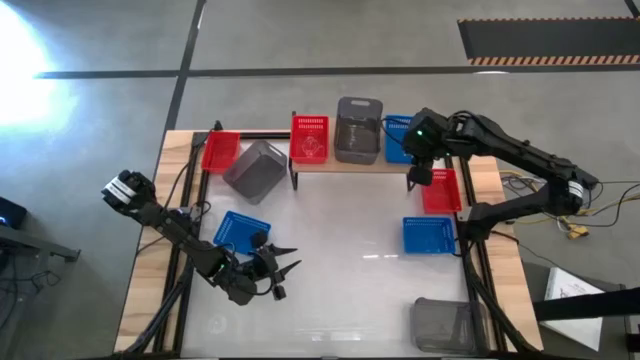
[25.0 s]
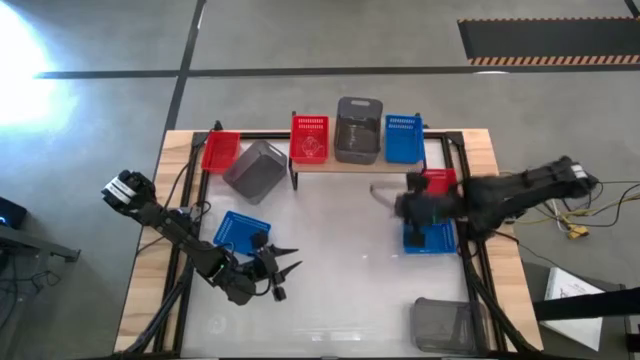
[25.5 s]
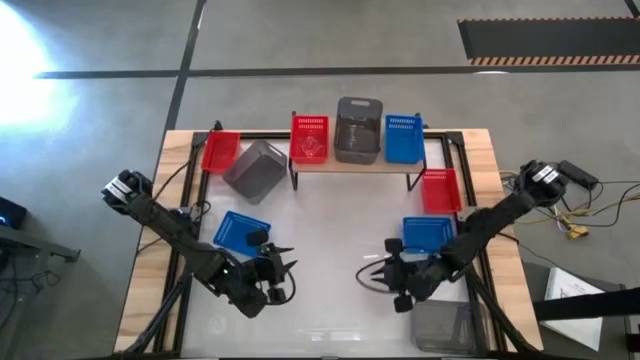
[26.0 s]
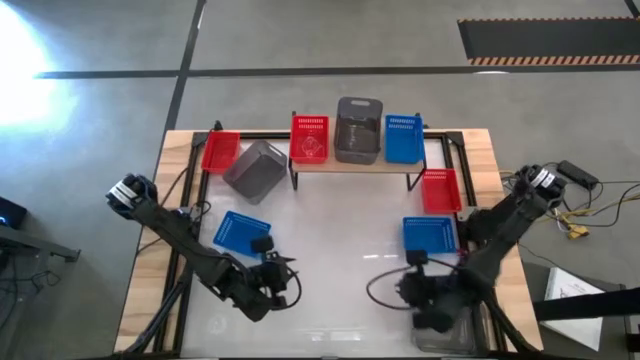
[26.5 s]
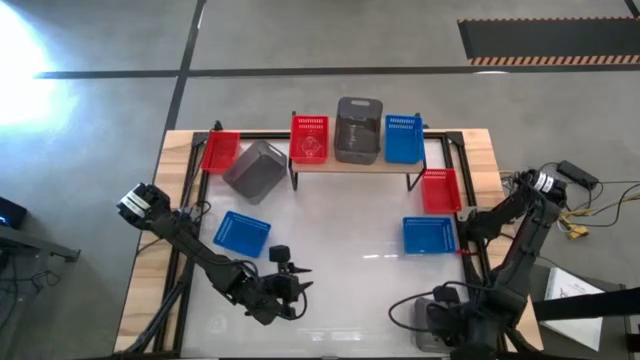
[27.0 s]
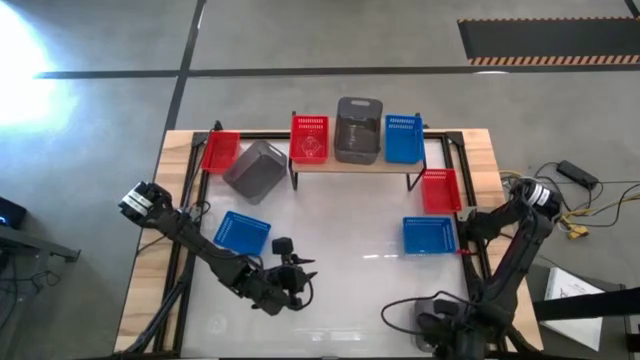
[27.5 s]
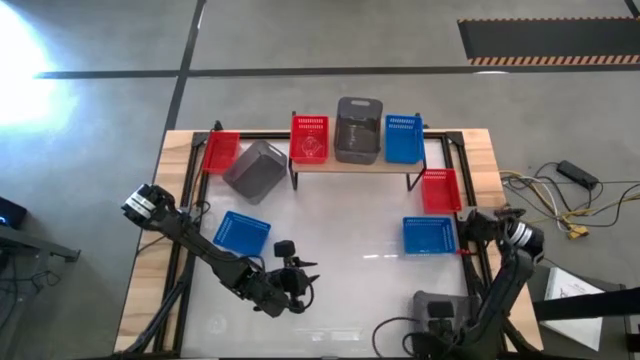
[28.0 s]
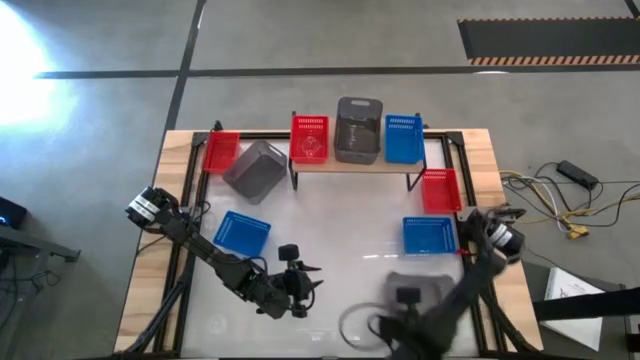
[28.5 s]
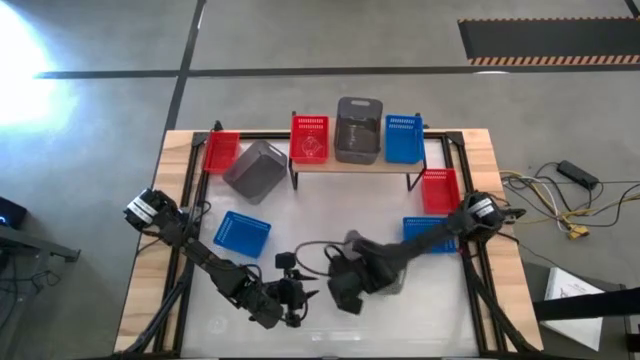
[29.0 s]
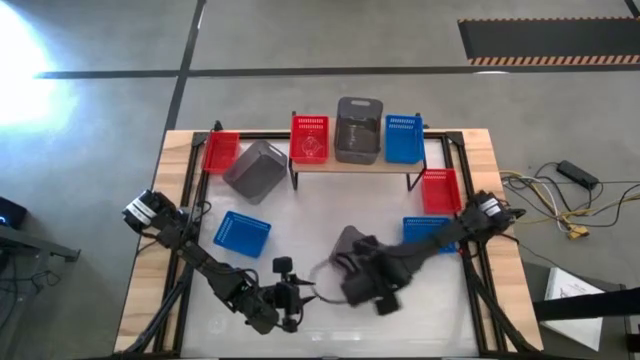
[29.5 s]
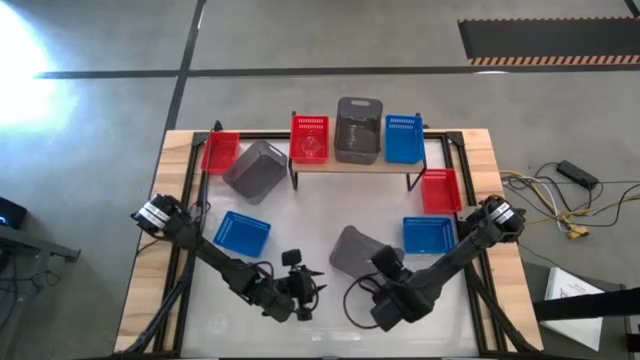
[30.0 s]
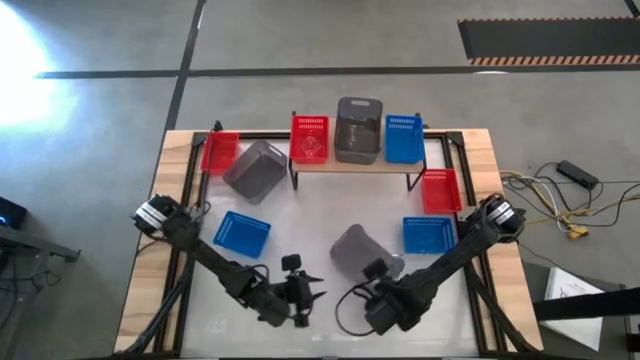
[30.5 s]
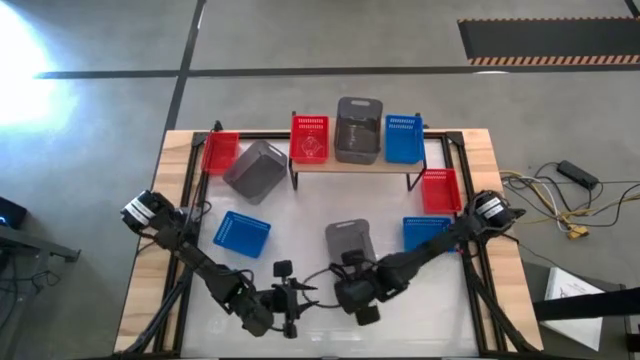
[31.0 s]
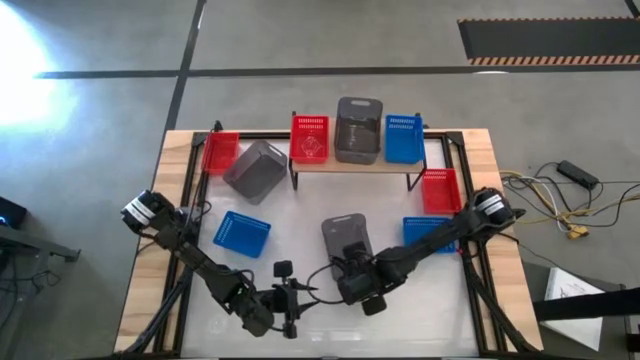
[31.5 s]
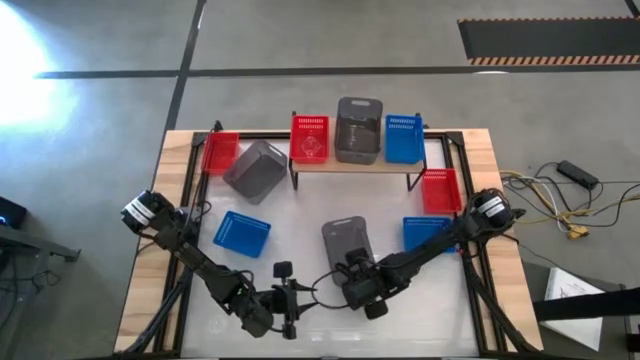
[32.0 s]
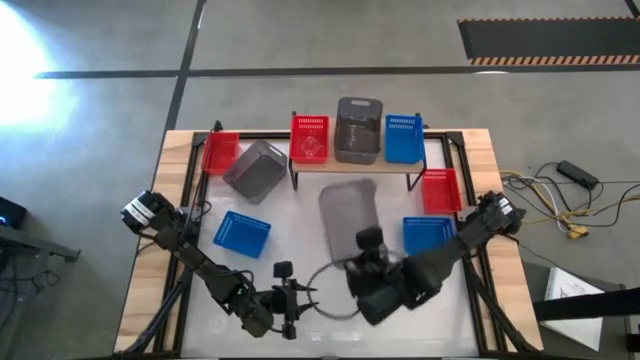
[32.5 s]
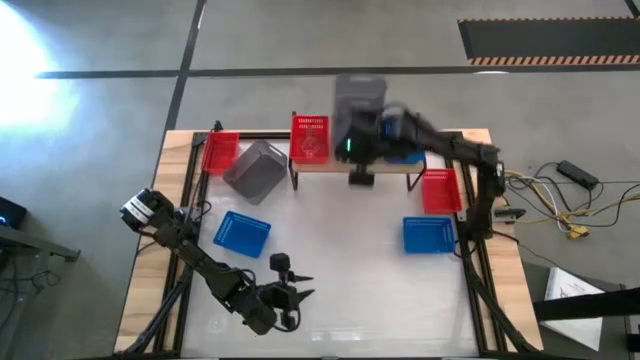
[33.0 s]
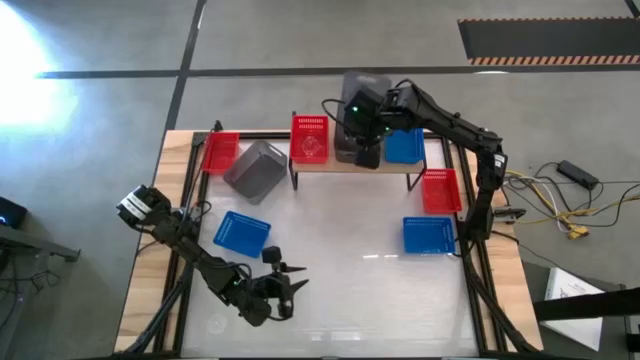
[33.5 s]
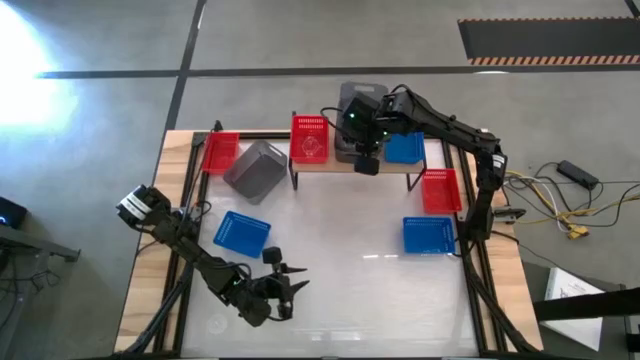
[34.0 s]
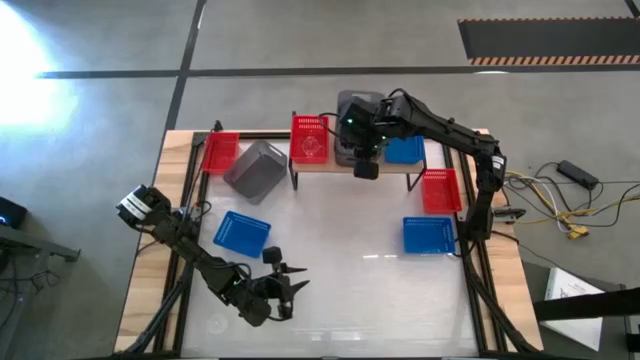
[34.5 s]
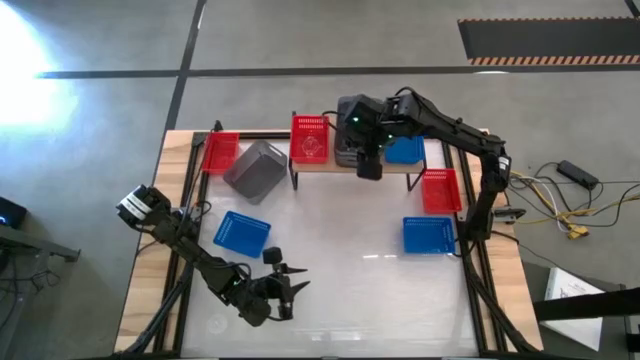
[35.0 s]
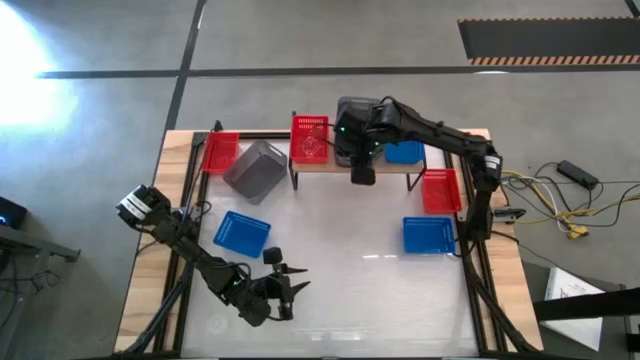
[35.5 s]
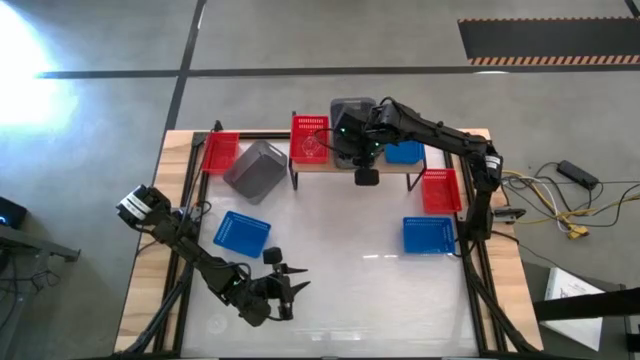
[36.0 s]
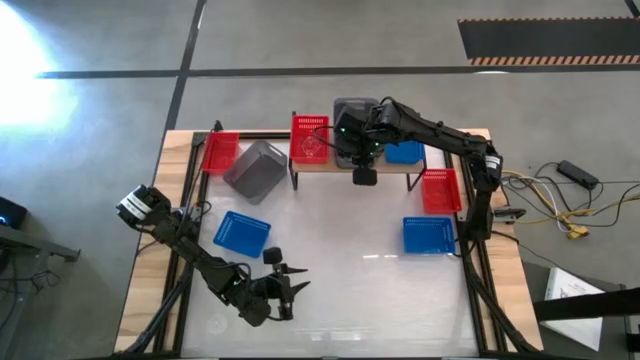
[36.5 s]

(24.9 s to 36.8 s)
Task: Stack baskets on shelf by color
Stack the right black bin into the black bin on the shelf

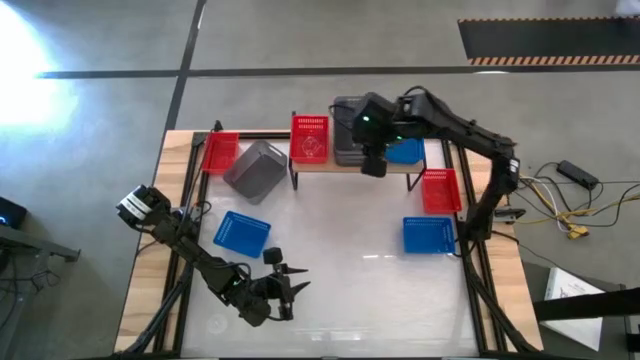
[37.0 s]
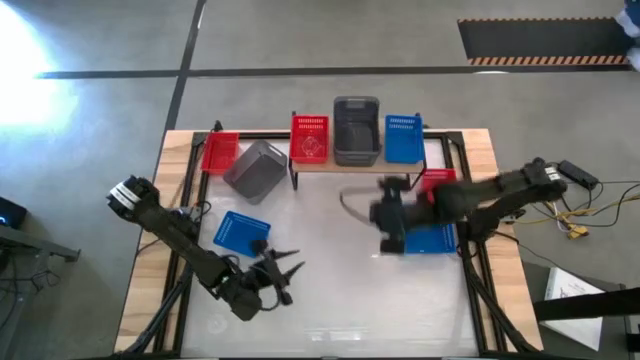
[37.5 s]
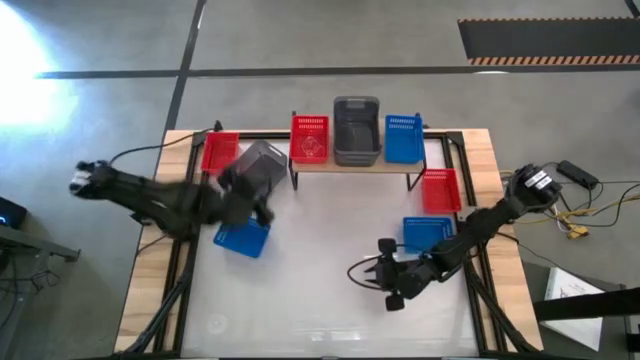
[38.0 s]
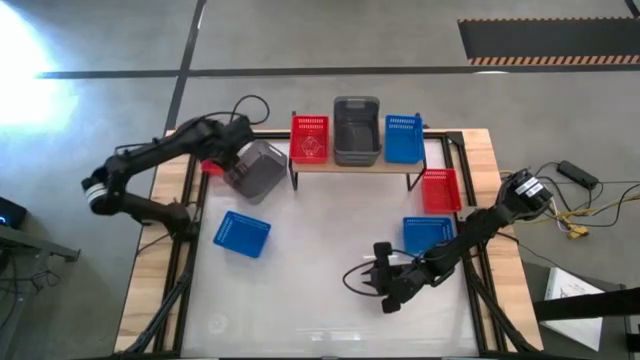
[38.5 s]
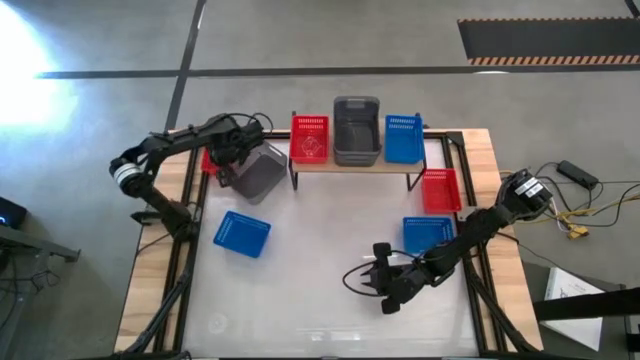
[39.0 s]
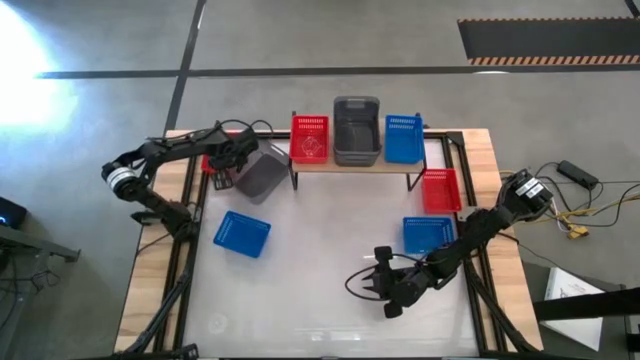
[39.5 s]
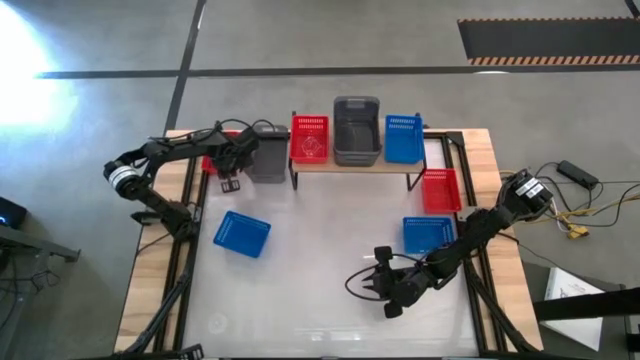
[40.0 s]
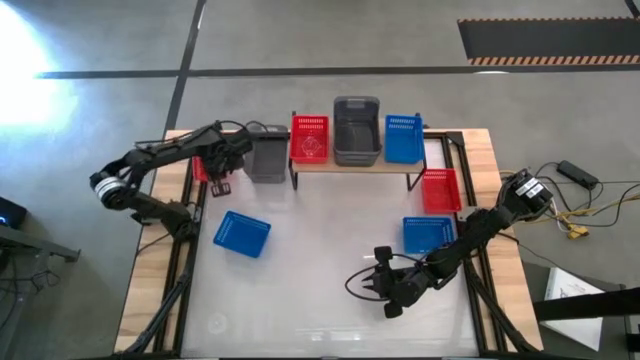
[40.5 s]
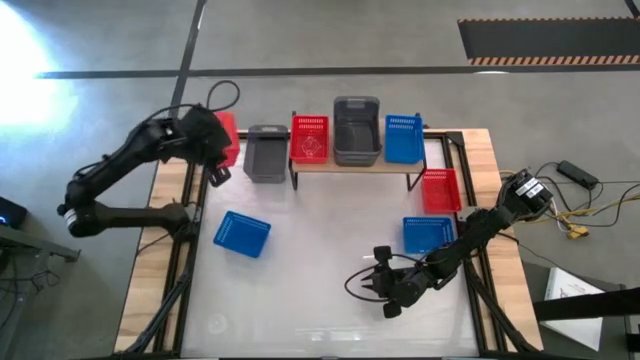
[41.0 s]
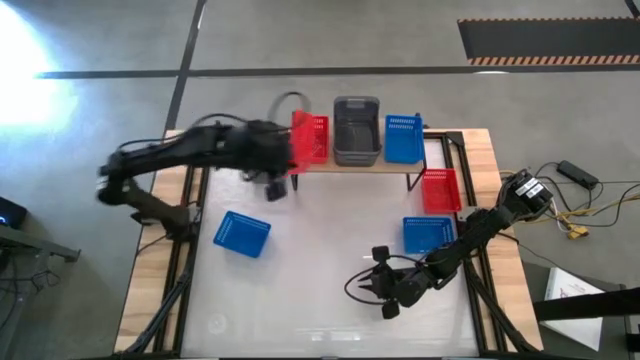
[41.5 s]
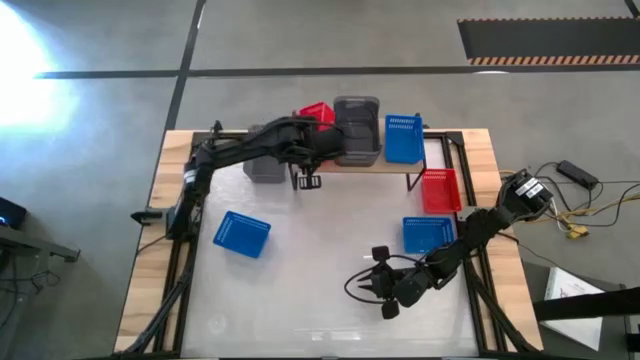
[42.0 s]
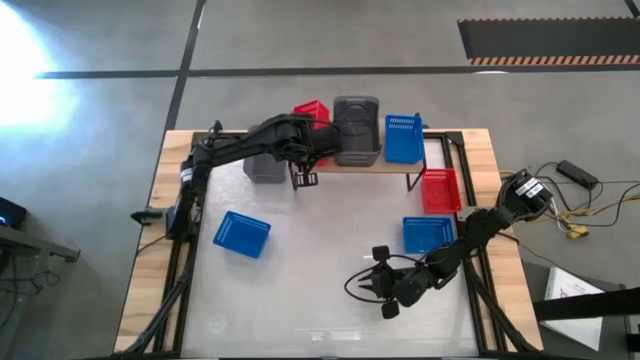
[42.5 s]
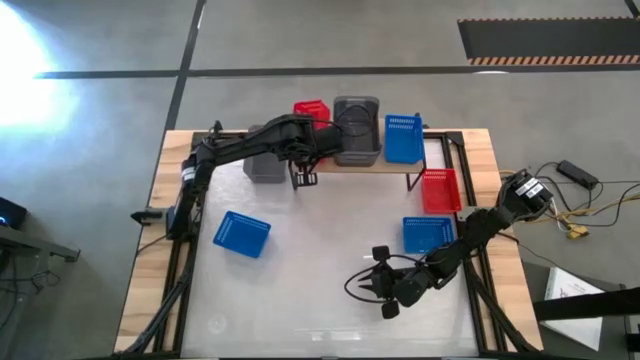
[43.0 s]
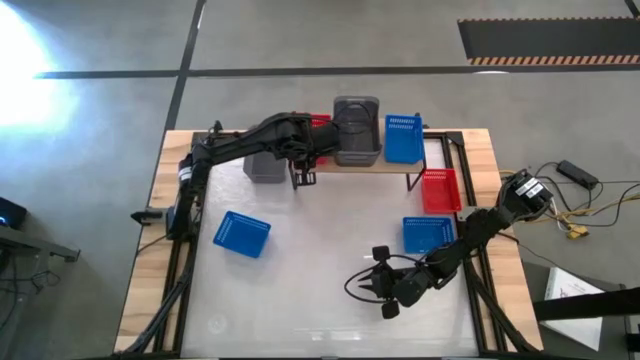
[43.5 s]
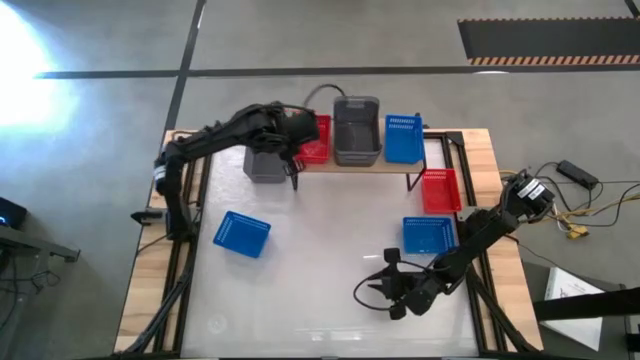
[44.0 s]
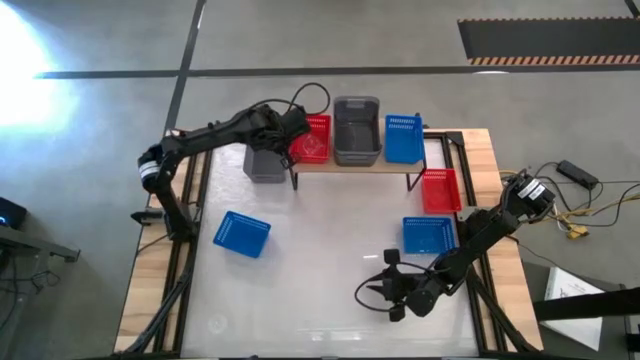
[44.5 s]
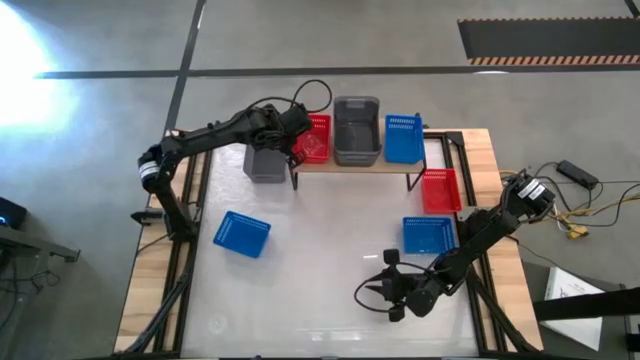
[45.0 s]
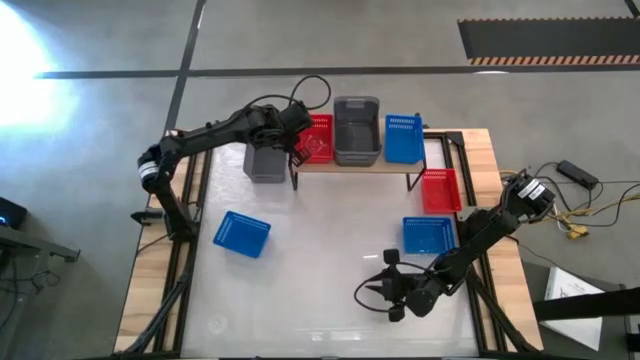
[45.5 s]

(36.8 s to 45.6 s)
Stack the left red bin into the red bin on the shelf
